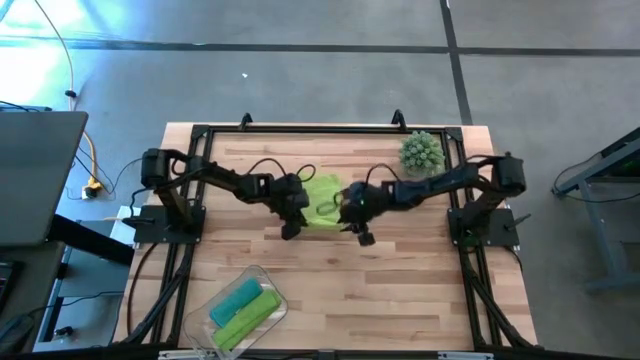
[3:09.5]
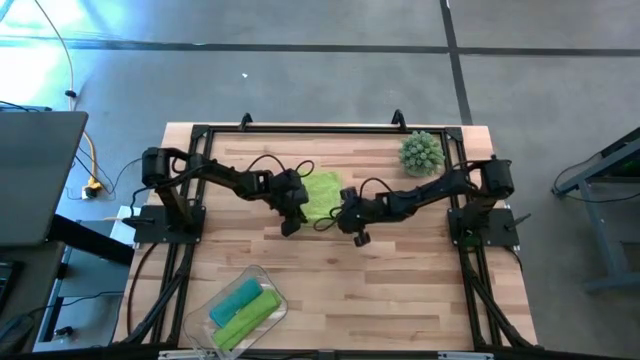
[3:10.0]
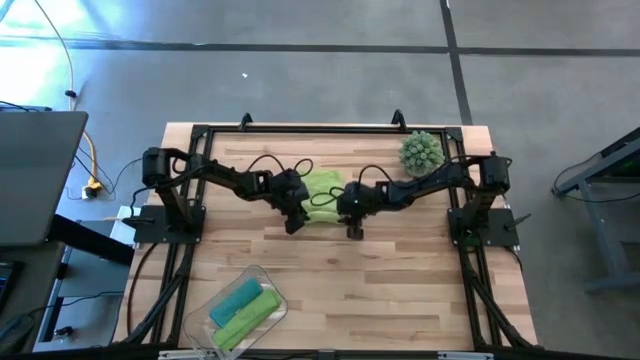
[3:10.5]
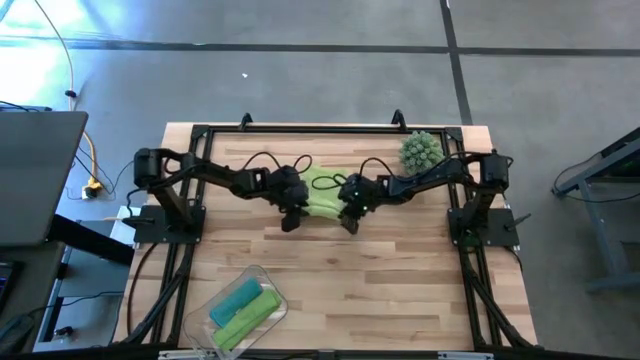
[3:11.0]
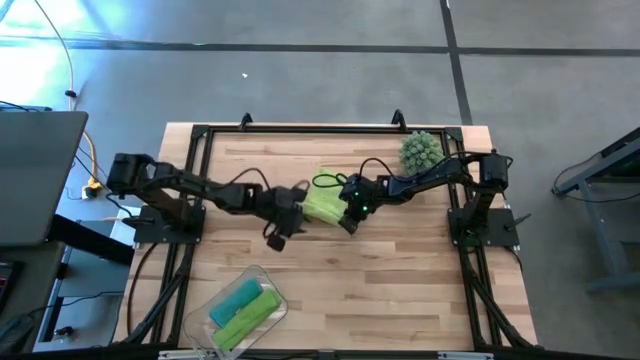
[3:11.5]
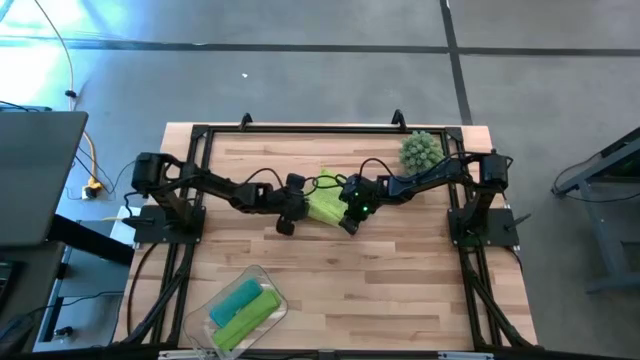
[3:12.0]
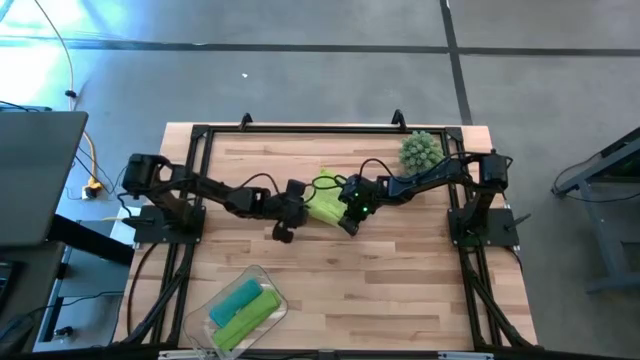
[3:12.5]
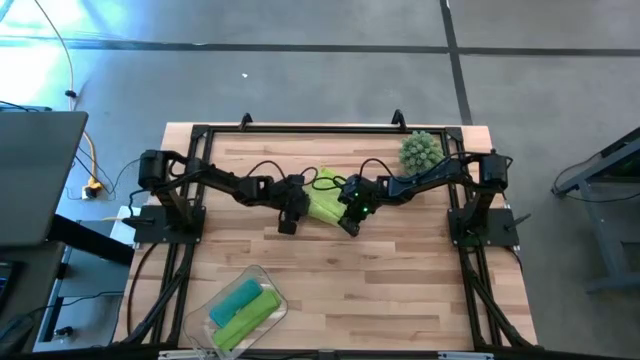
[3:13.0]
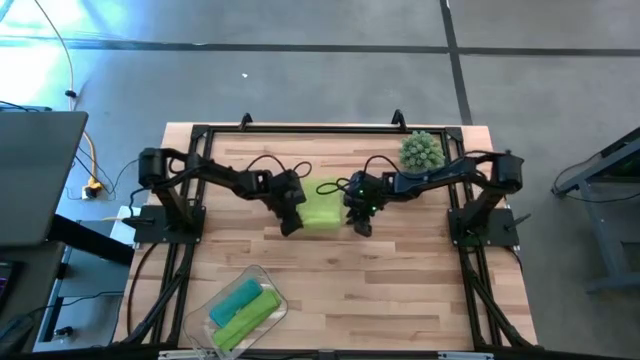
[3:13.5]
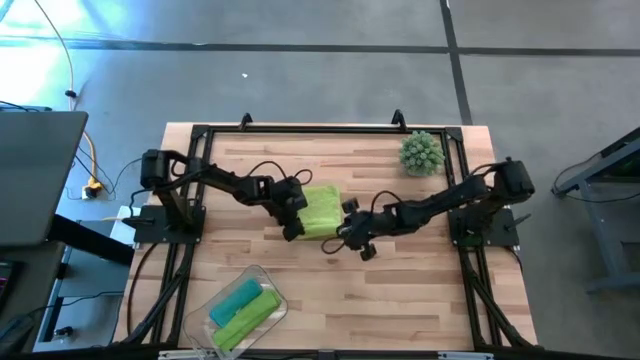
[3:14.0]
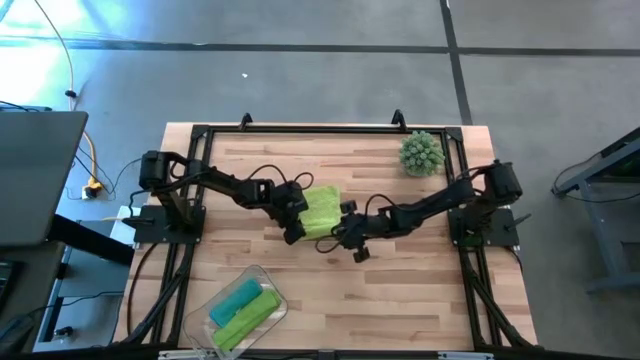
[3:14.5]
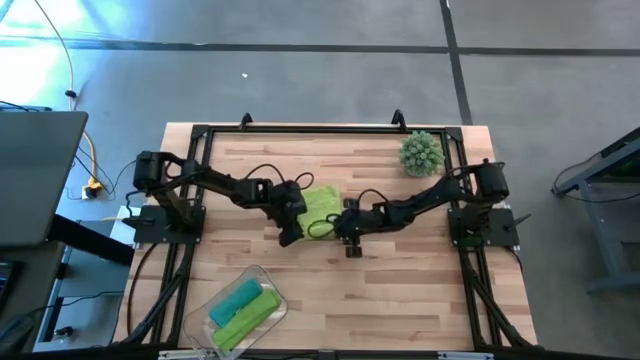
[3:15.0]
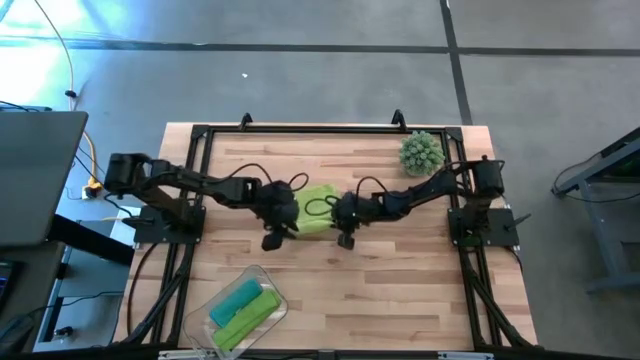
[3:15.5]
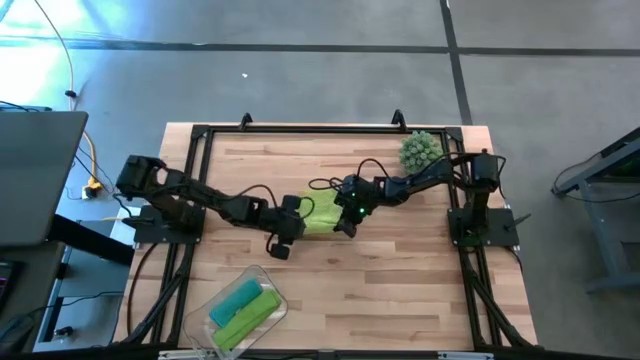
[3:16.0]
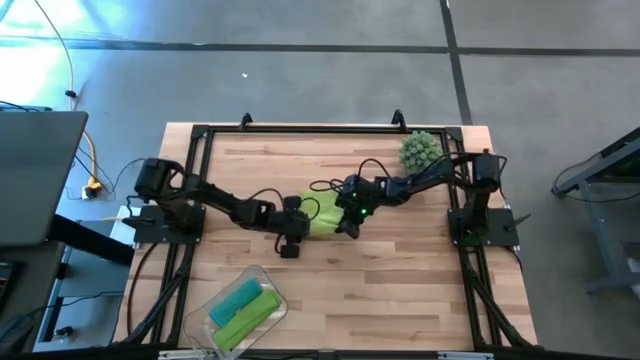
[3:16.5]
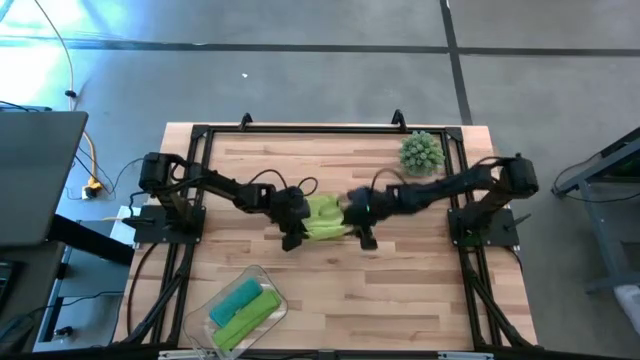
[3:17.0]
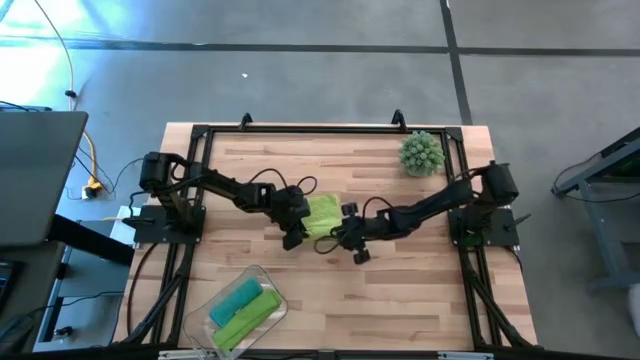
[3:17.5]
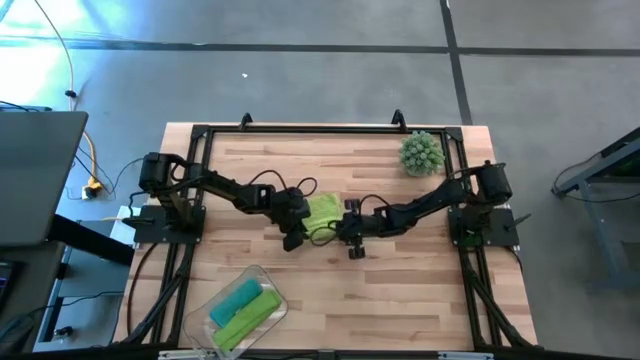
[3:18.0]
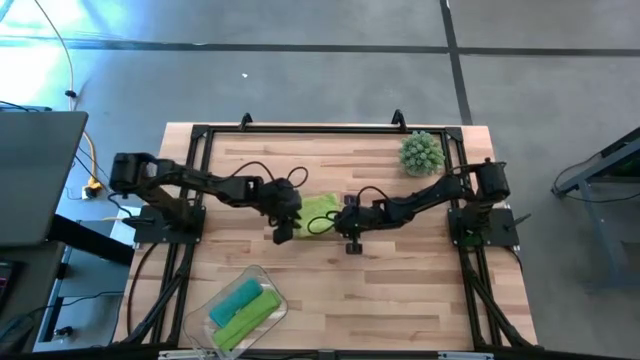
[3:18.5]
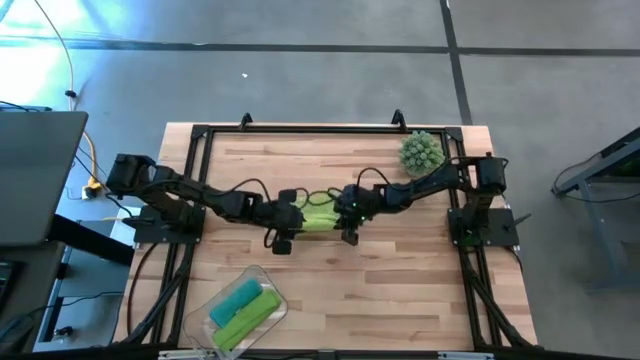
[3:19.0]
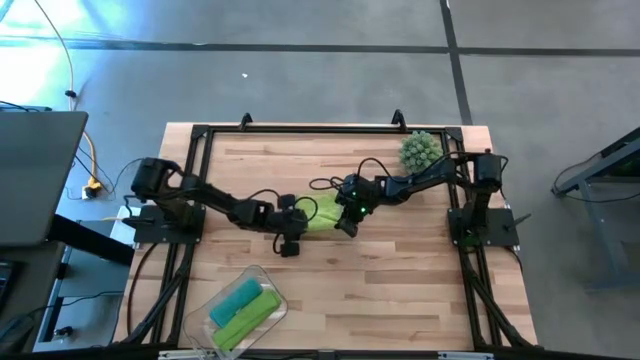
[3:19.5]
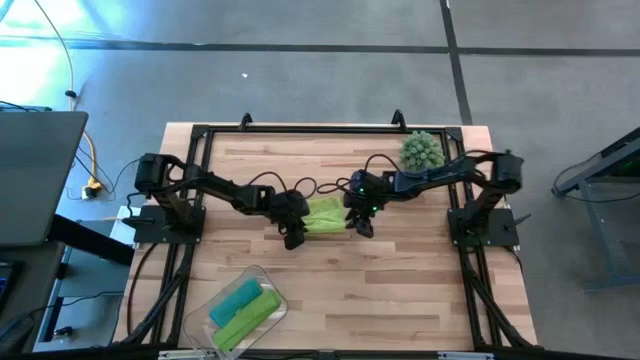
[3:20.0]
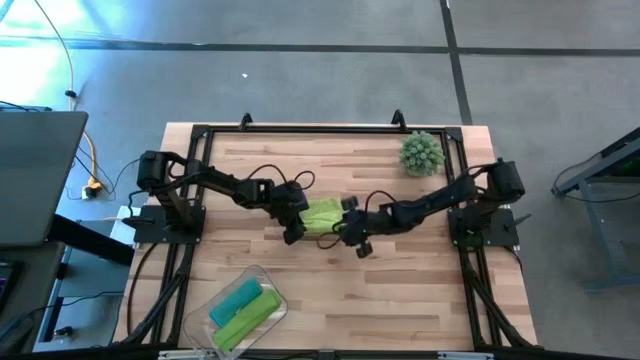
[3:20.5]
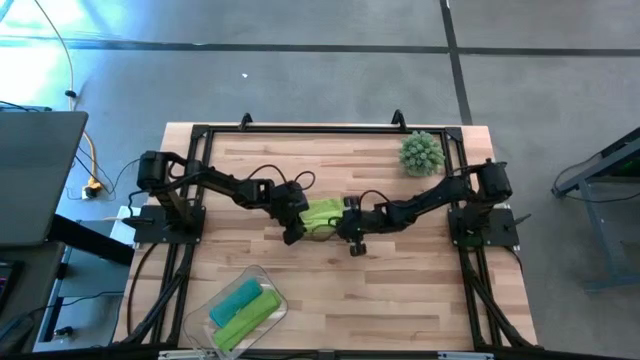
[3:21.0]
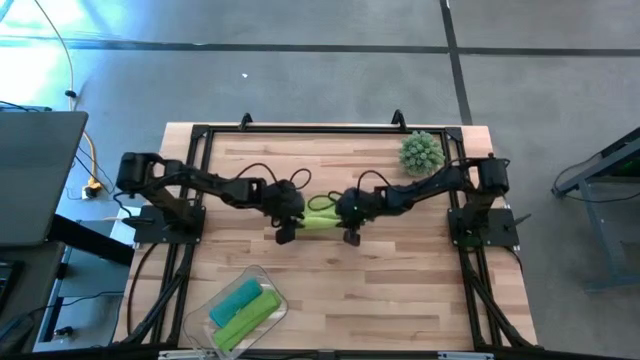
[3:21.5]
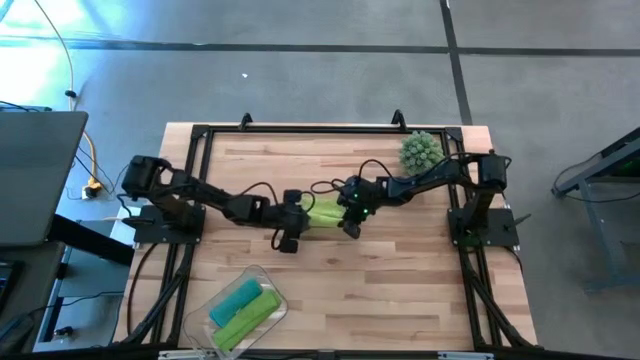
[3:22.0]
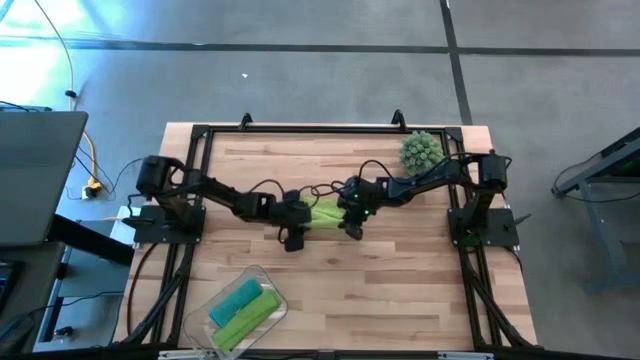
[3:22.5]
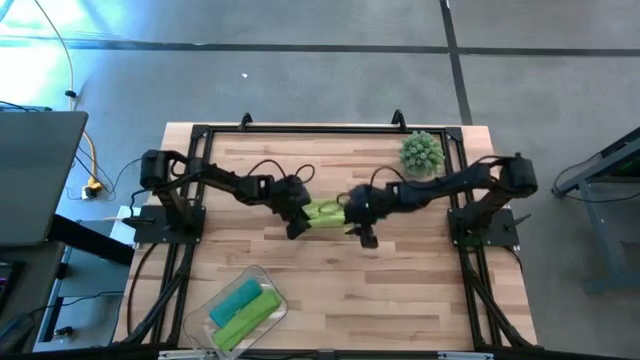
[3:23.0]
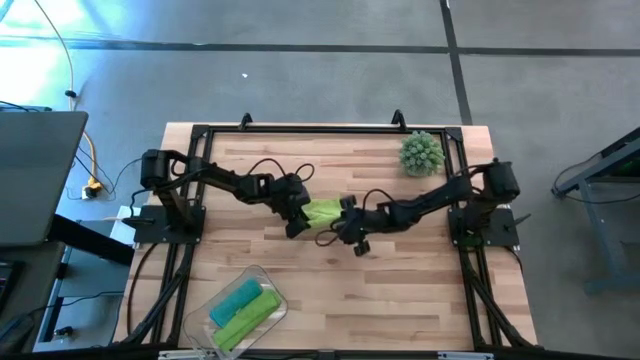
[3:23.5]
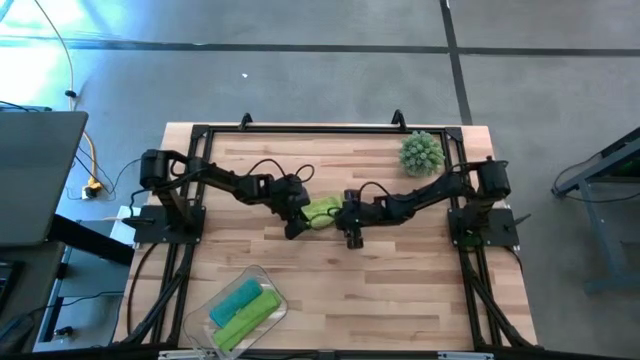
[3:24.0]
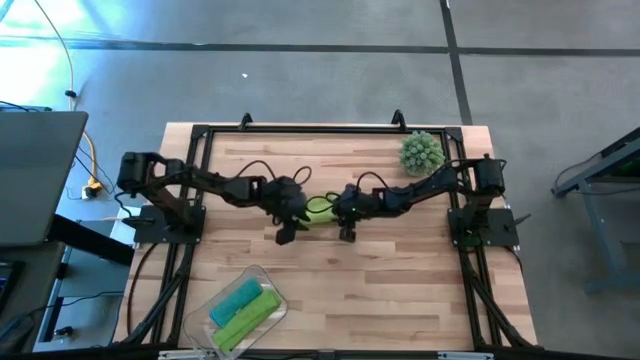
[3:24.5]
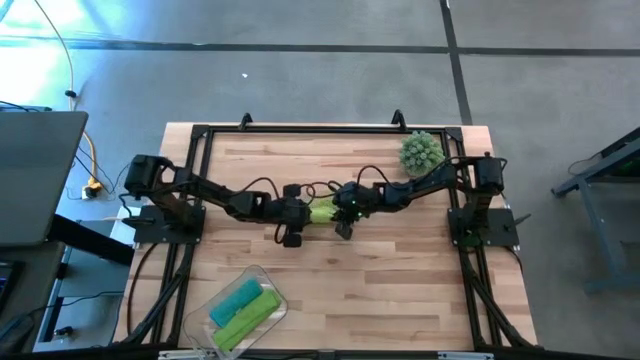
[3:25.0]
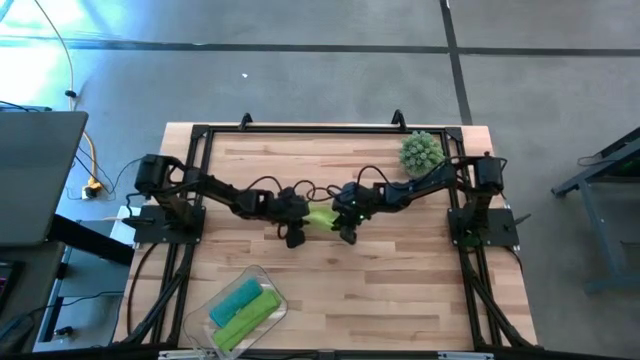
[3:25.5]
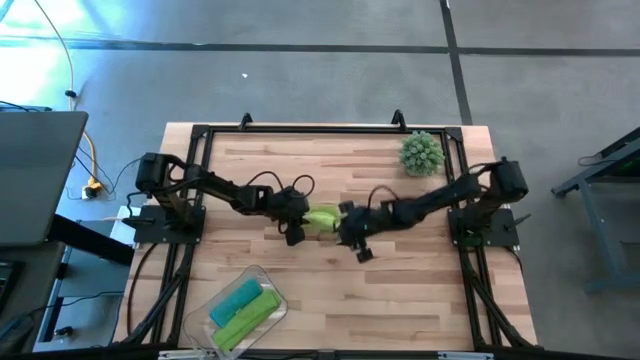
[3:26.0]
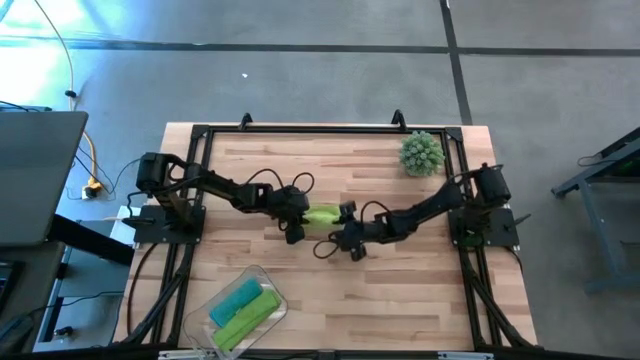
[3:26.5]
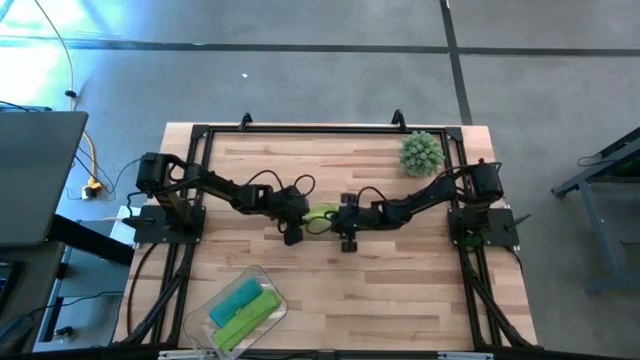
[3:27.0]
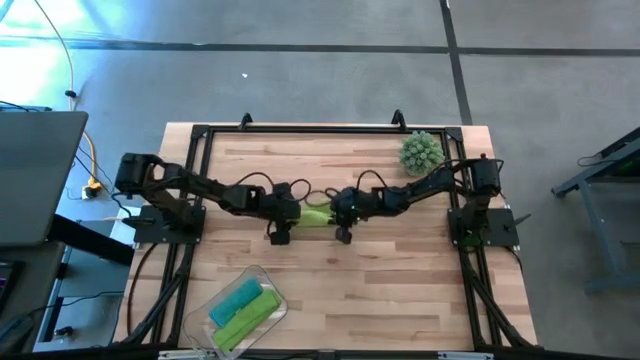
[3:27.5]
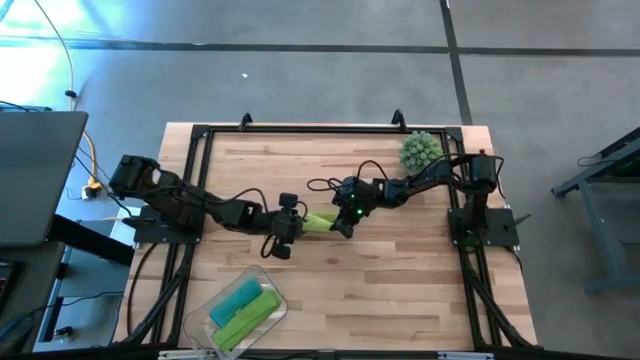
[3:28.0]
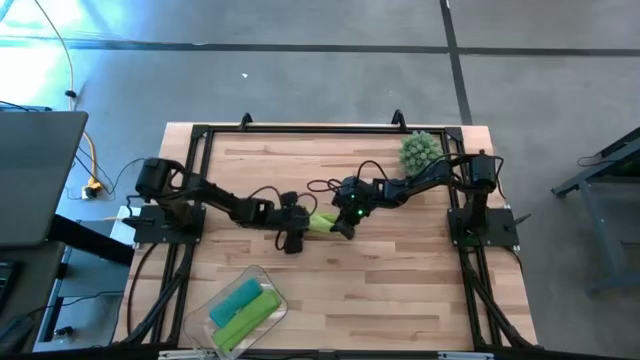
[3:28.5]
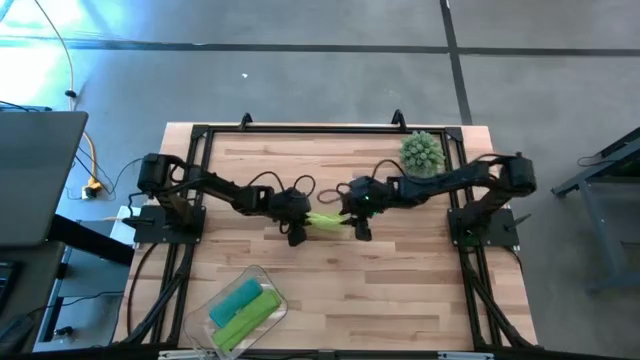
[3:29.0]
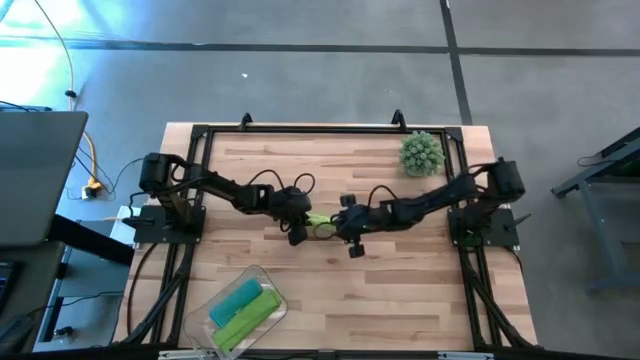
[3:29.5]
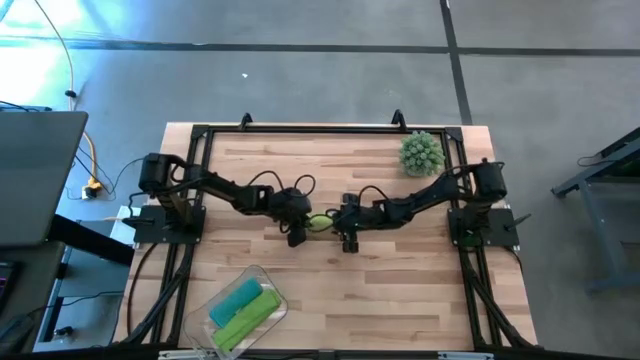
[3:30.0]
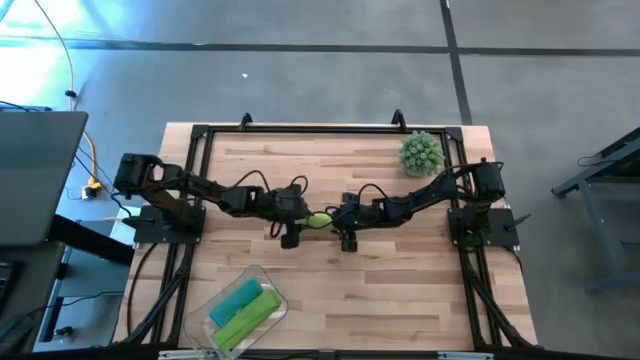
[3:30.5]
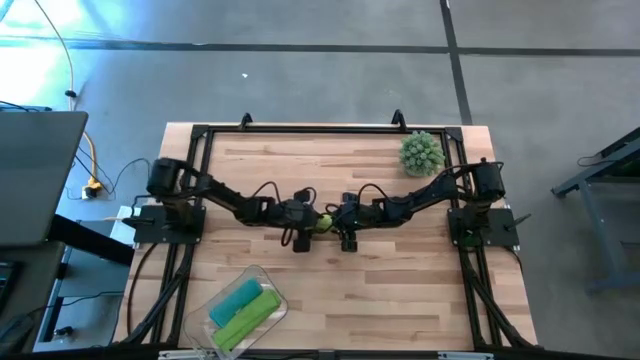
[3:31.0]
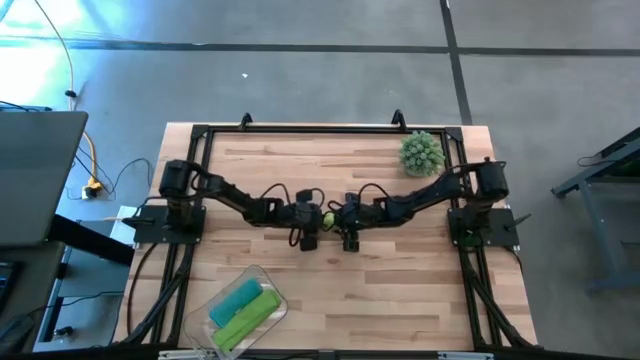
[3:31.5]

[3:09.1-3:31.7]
Task: Roll microfiber towels into tight, uniform cylinder then place into a basket
Roll the light green microfiber cloth
